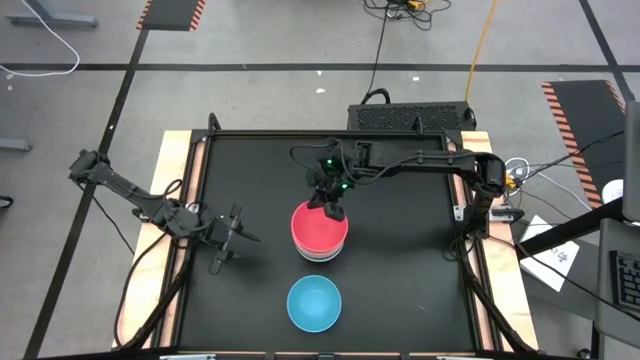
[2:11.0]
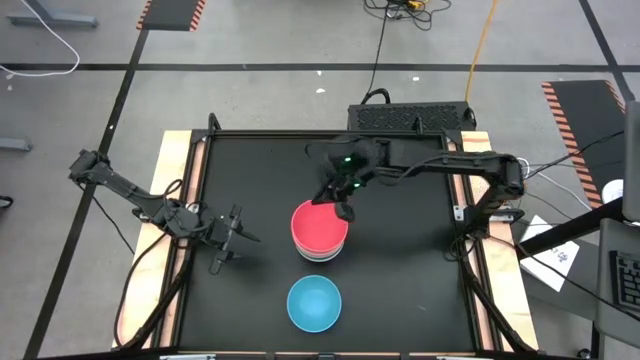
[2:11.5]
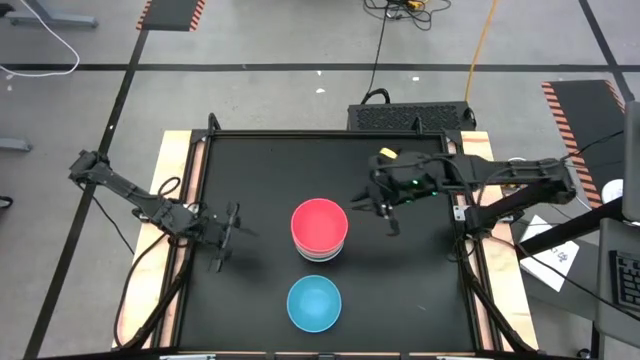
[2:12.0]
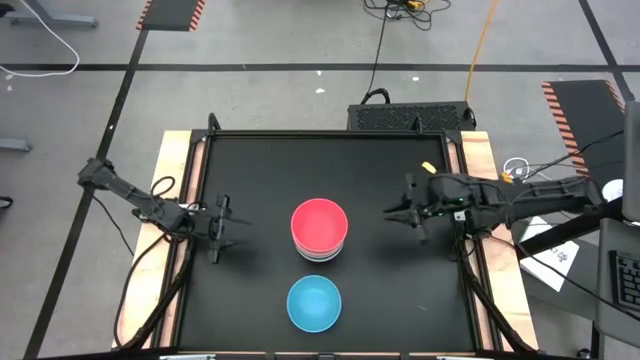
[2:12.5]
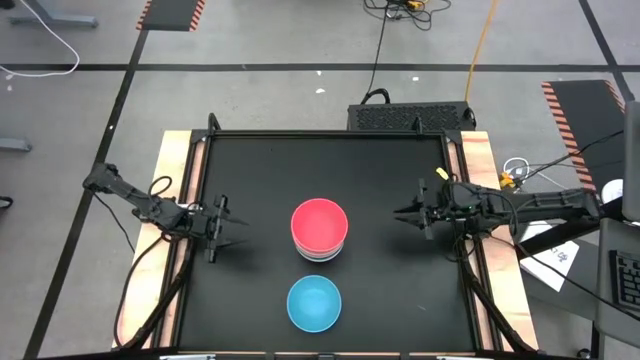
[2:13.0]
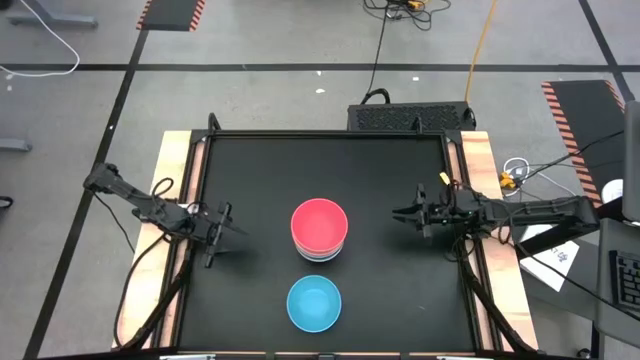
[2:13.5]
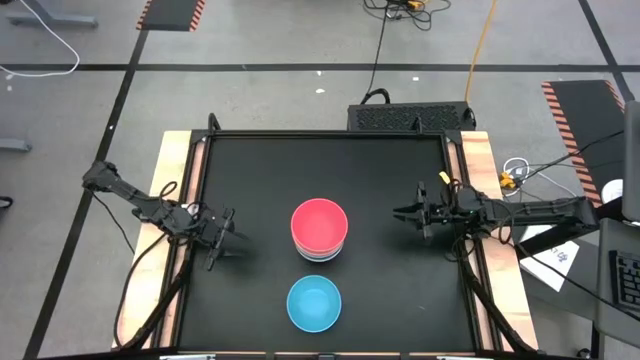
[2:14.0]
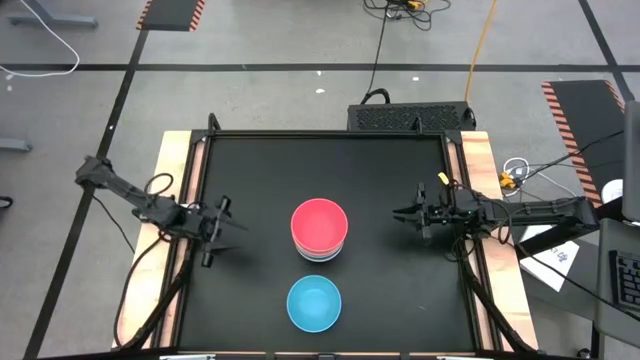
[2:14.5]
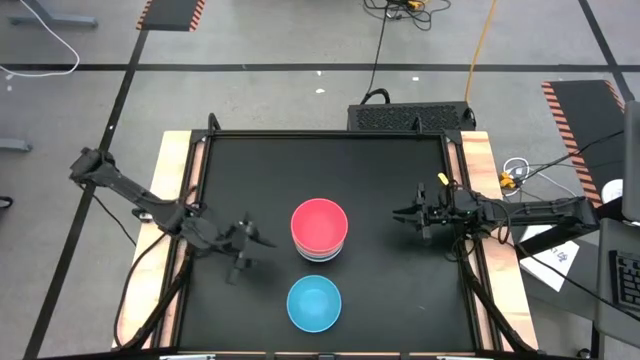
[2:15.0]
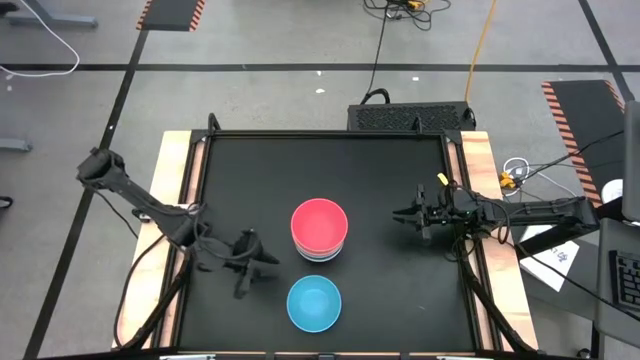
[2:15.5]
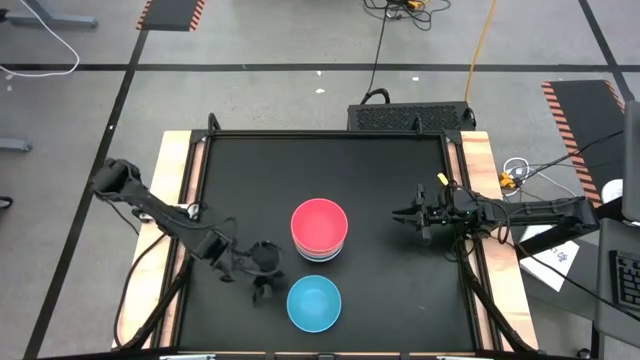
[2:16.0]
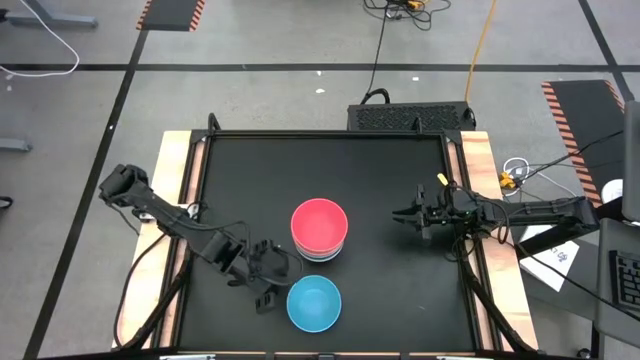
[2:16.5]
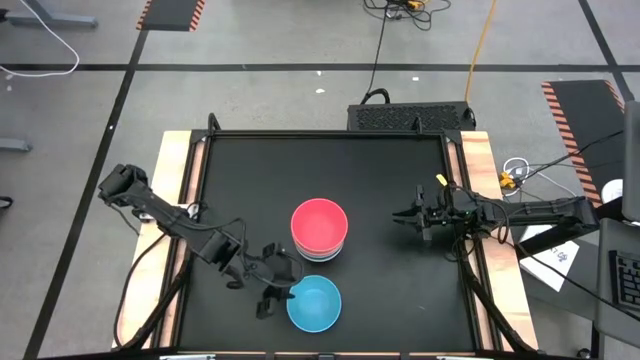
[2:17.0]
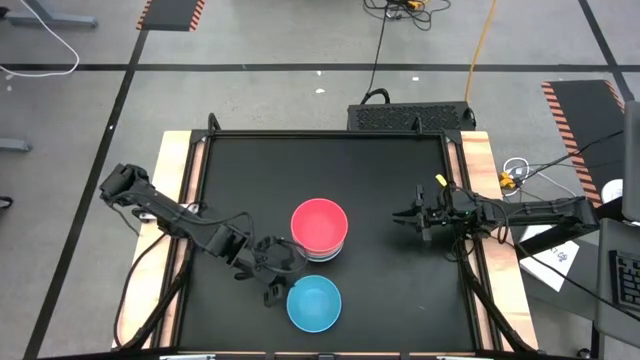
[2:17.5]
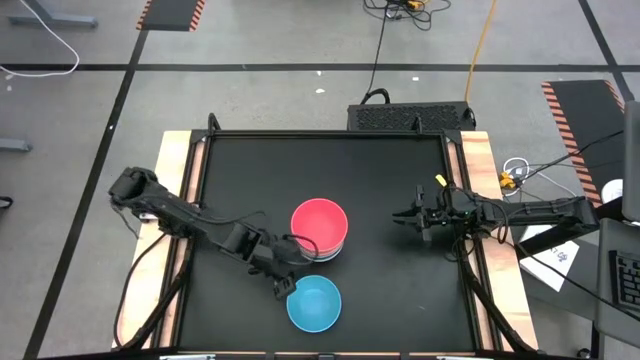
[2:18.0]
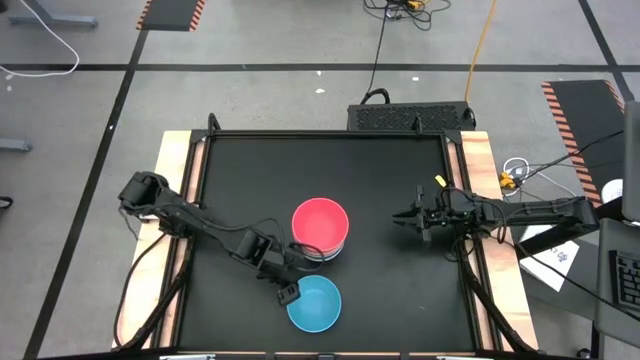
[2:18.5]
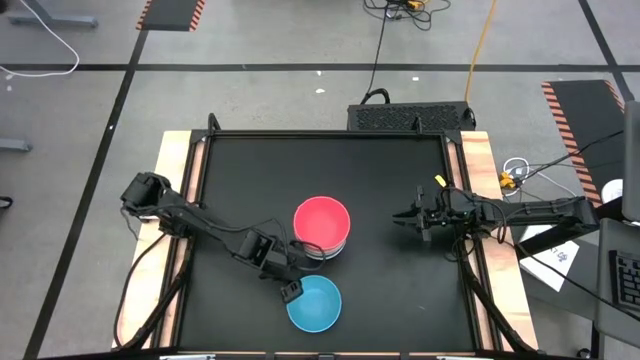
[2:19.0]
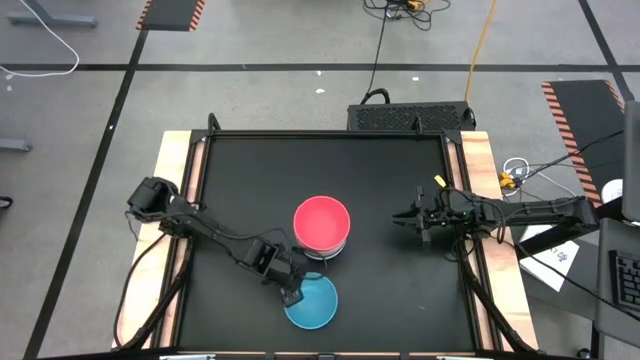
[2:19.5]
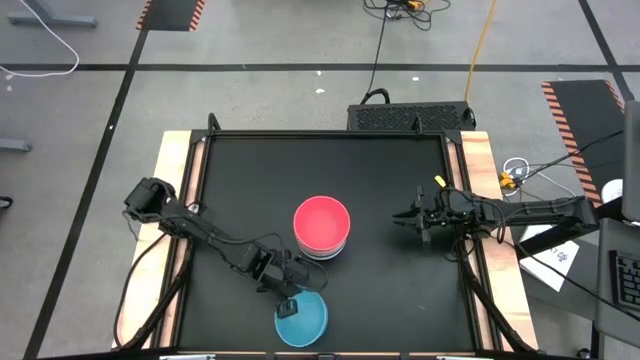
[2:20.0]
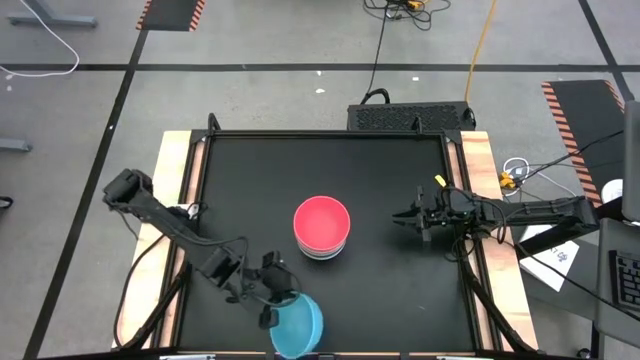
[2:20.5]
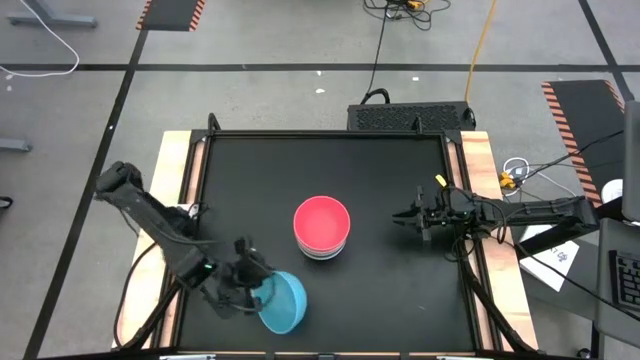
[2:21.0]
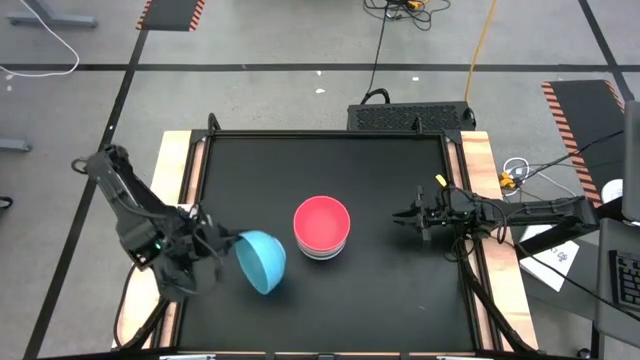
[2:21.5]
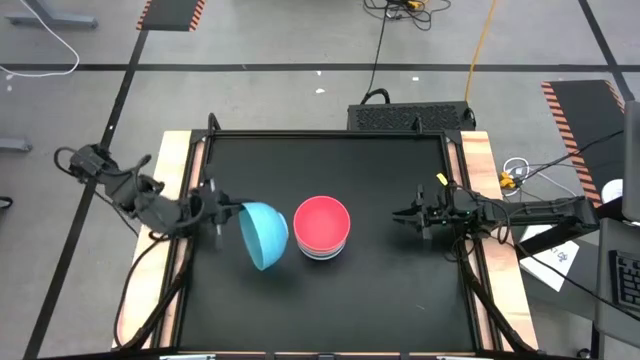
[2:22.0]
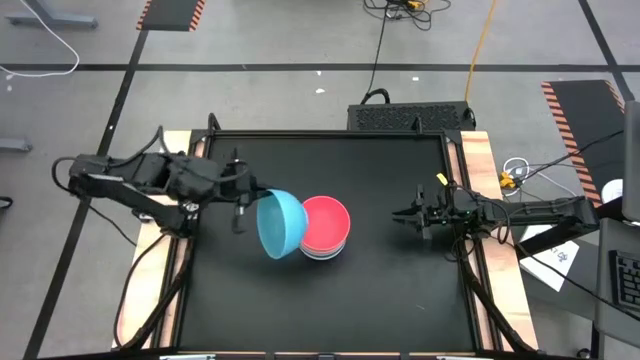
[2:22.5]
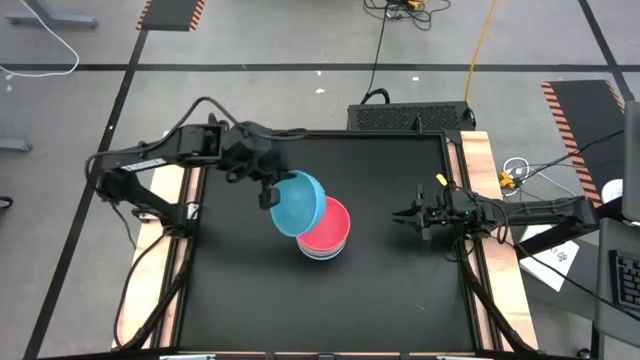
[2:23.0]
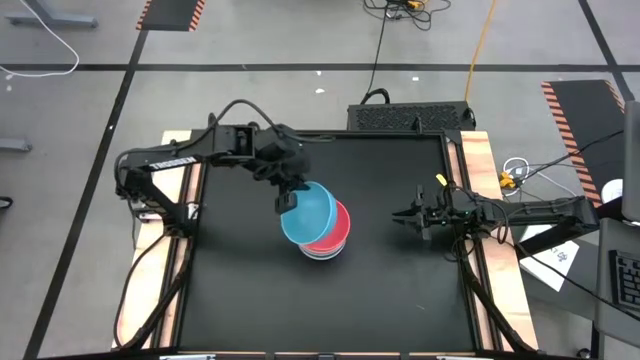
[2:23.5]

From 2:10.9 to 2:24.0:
Task: Nest bowls inside each other
Stack the blue bowl on the red bowl

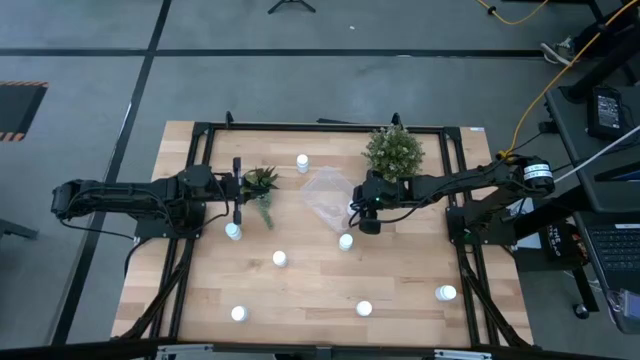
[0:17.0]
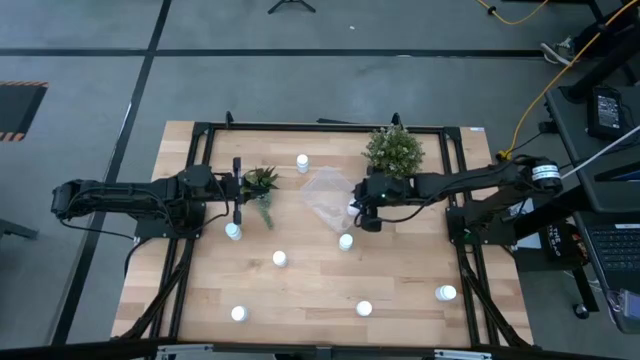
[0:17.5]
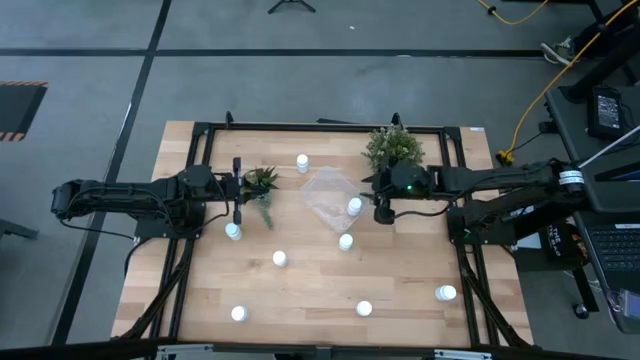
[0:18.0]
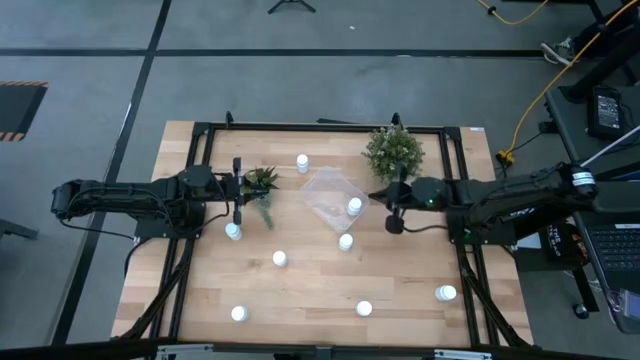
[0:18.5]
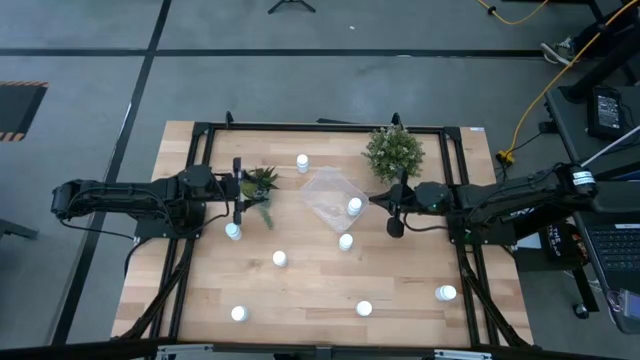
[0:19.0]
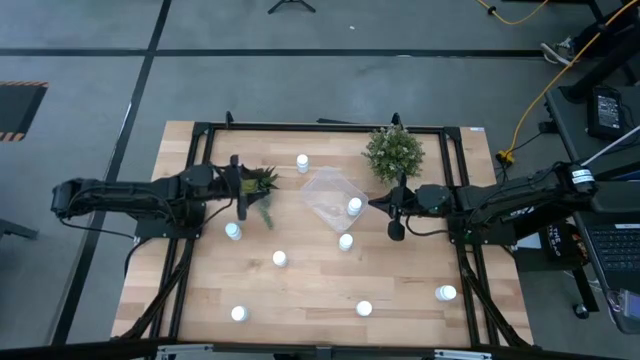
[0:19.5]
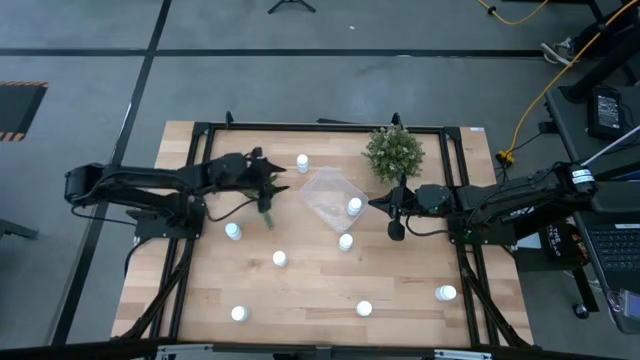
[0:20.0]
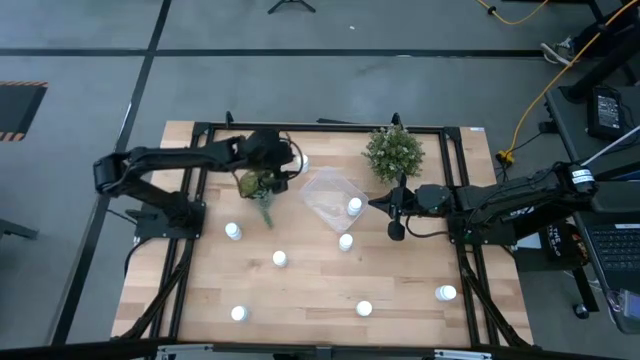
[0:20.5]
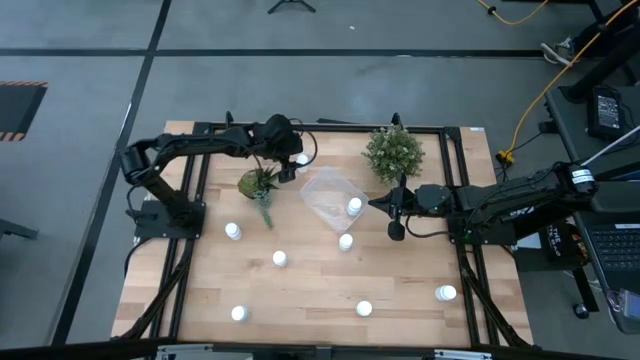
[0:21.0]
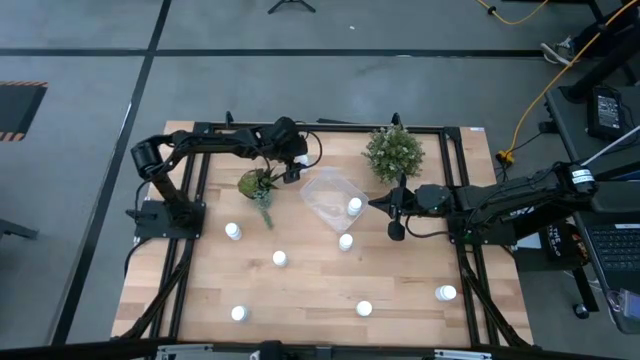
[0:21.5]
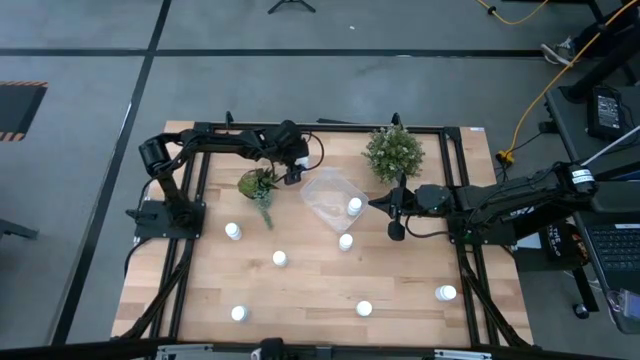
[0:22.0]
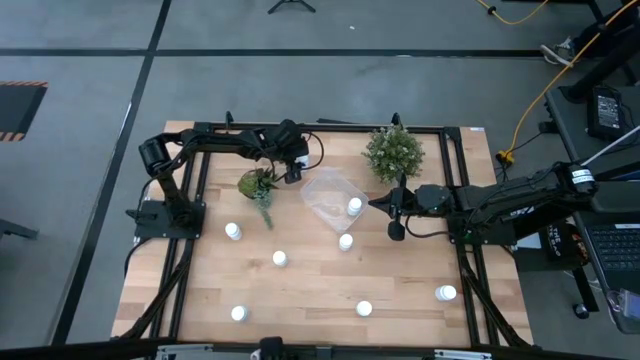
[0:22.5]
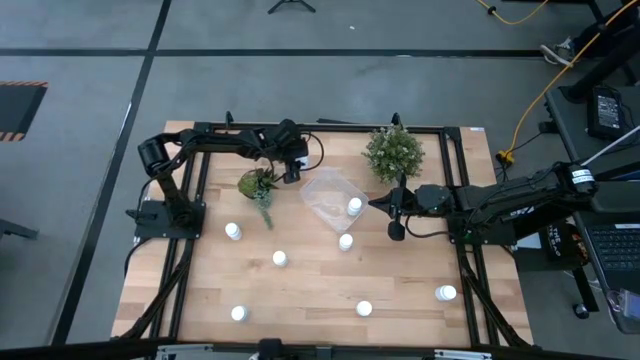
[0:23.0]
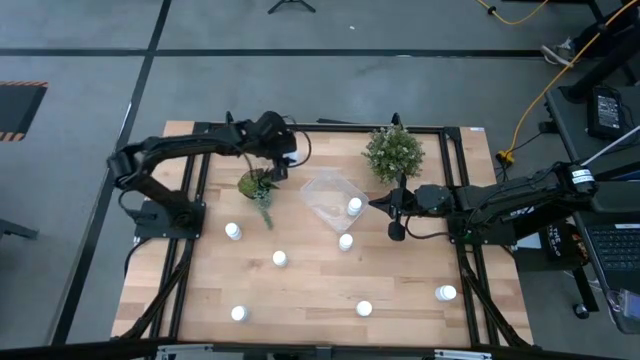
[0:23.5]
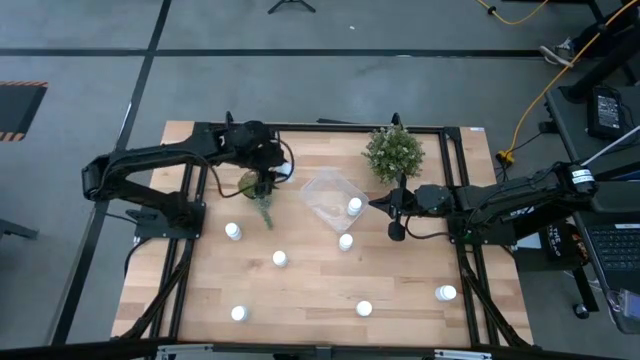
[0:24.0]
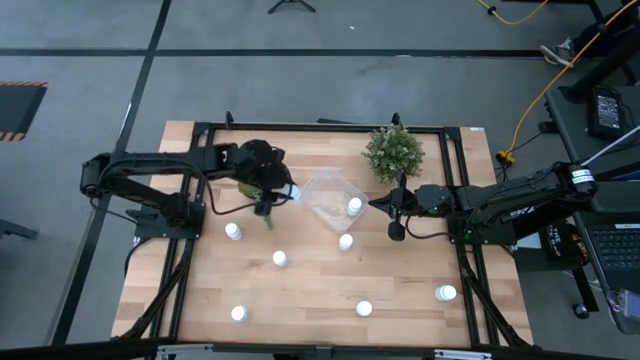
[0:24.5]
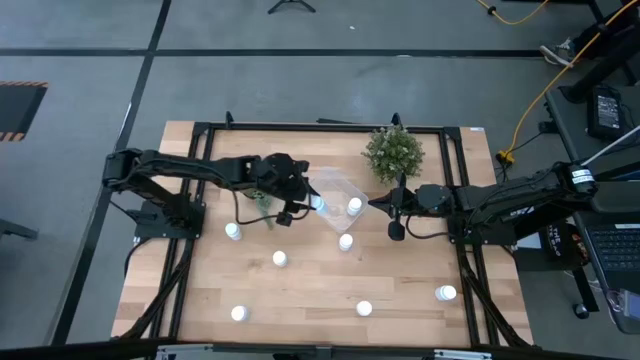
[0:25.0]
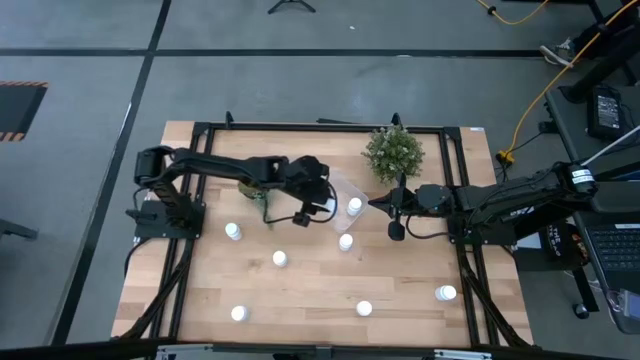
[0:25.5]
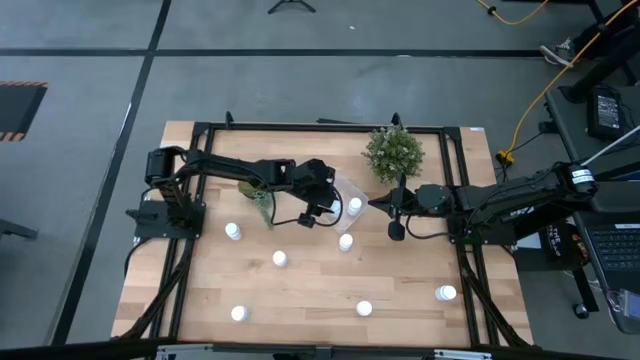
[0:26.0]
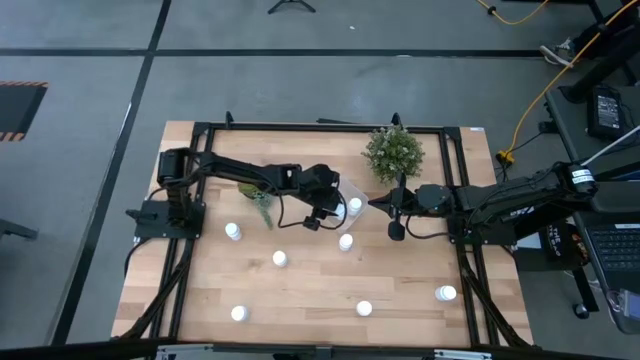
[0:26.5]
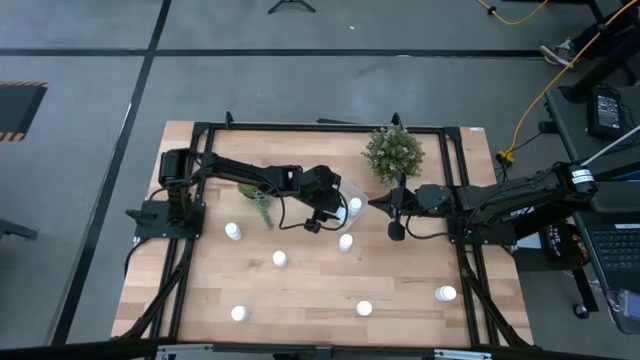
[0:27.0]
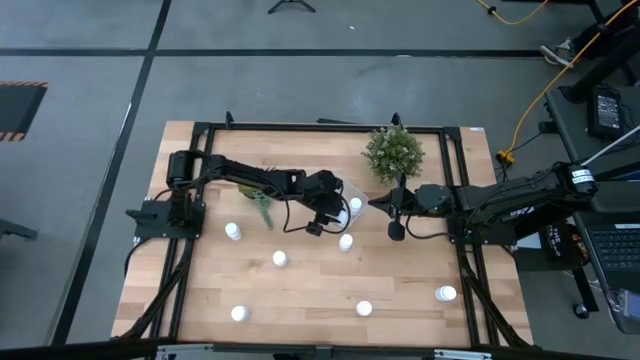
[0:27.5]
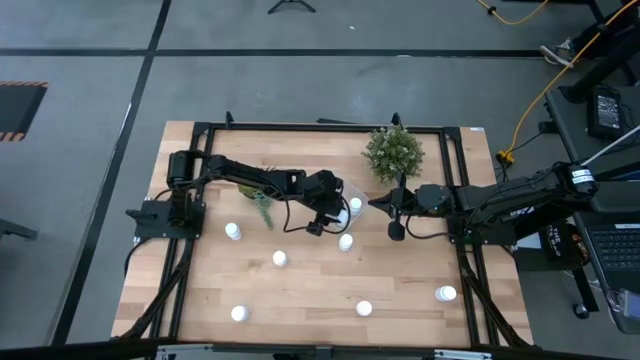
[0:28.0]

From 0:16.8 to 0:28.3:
Task: Pick and place pill bottles into a basket
Put the pill bottle into the transparent bin
